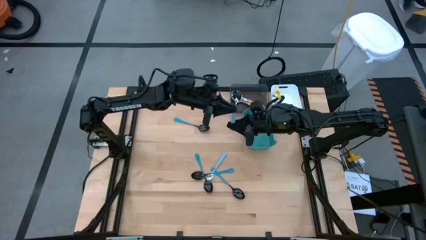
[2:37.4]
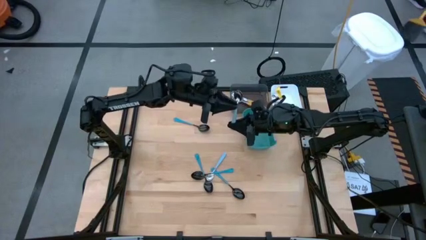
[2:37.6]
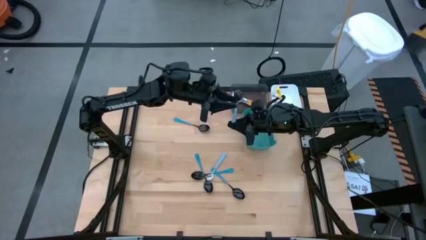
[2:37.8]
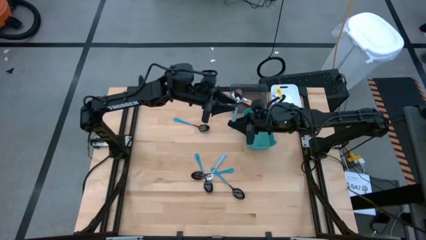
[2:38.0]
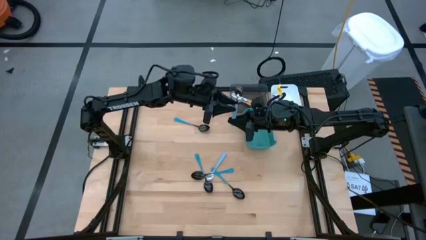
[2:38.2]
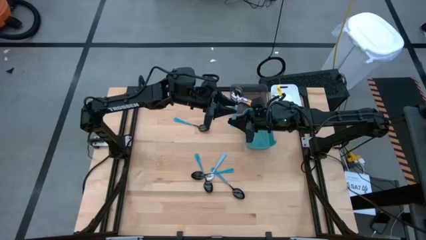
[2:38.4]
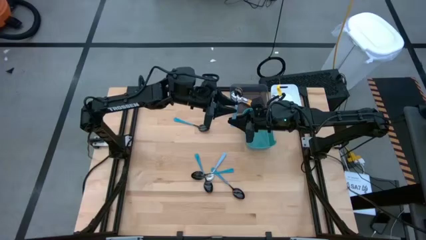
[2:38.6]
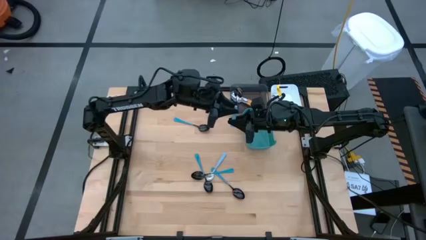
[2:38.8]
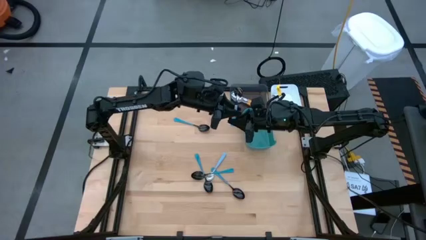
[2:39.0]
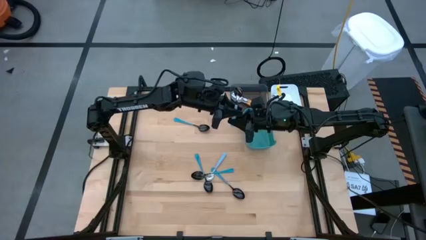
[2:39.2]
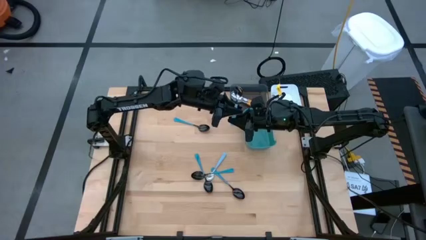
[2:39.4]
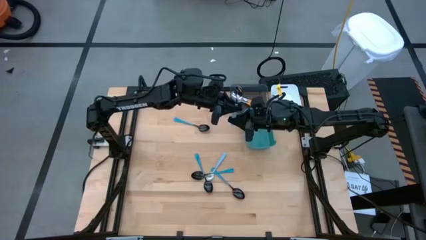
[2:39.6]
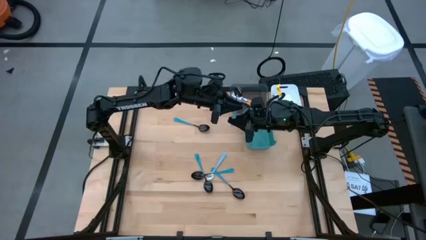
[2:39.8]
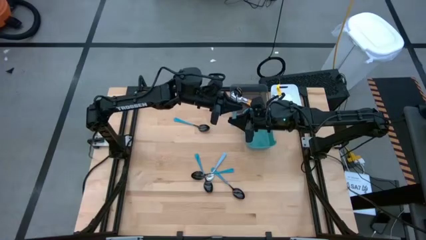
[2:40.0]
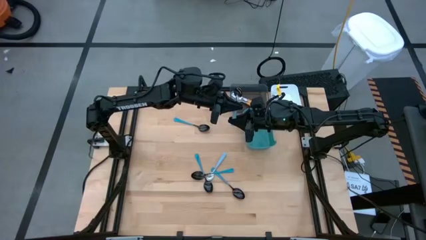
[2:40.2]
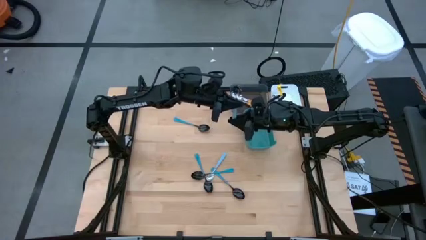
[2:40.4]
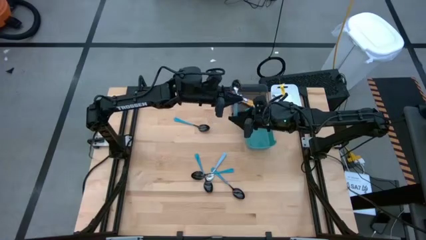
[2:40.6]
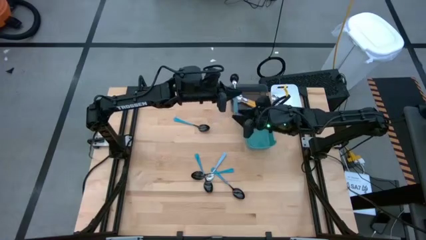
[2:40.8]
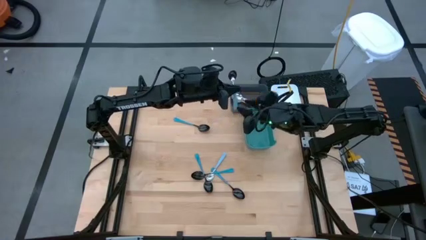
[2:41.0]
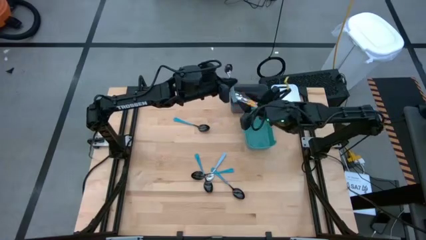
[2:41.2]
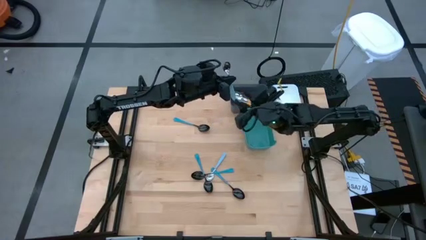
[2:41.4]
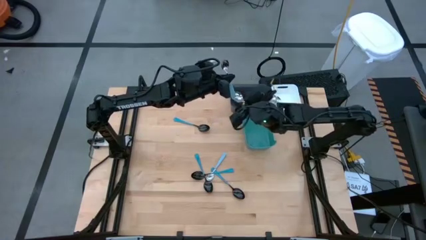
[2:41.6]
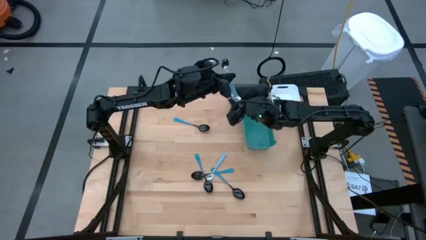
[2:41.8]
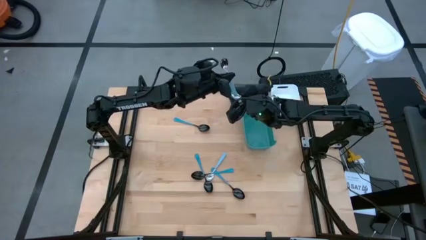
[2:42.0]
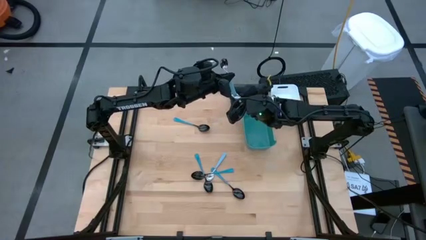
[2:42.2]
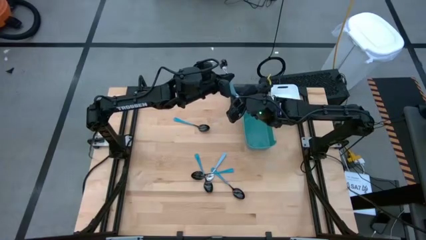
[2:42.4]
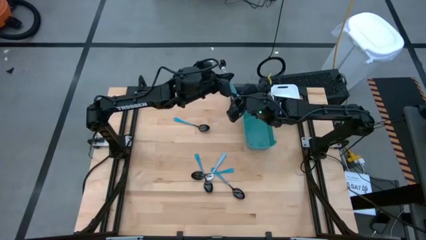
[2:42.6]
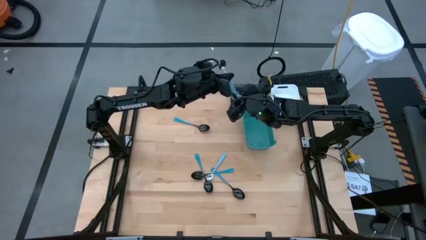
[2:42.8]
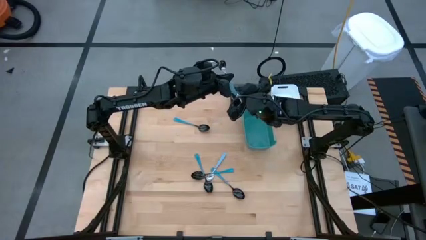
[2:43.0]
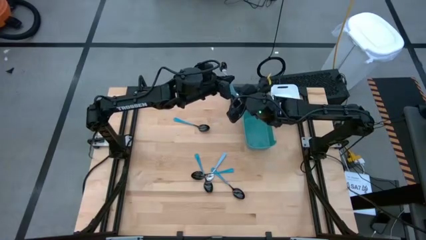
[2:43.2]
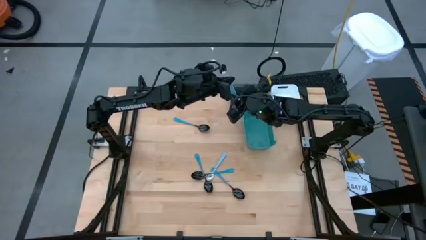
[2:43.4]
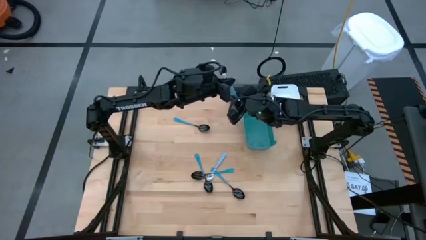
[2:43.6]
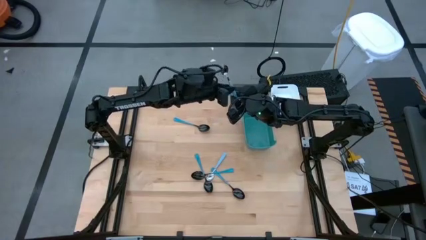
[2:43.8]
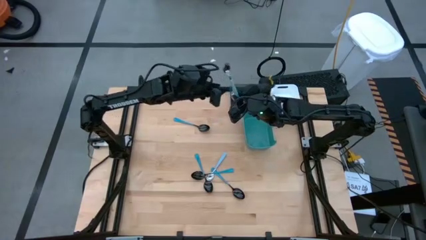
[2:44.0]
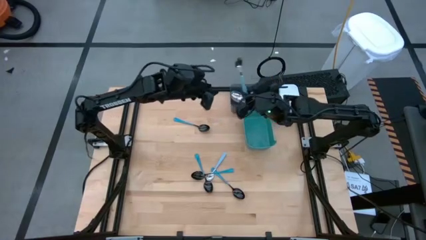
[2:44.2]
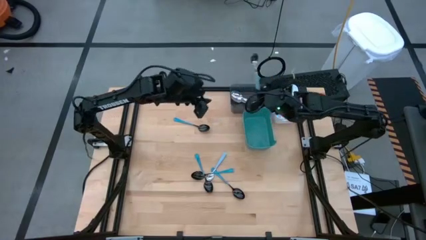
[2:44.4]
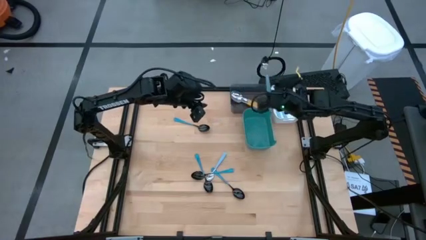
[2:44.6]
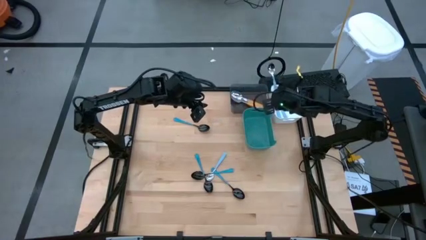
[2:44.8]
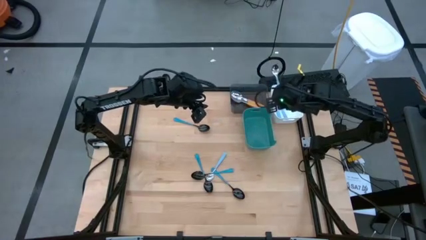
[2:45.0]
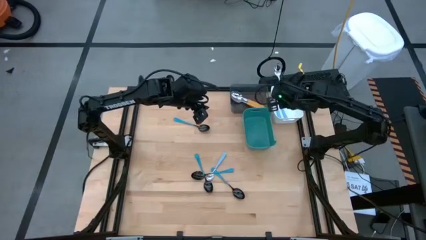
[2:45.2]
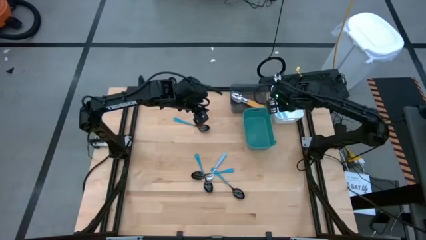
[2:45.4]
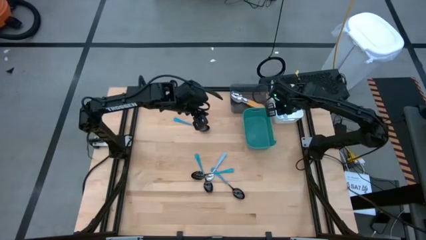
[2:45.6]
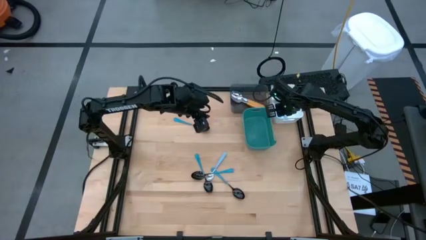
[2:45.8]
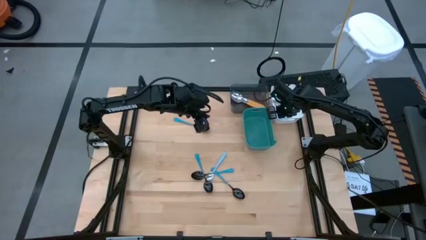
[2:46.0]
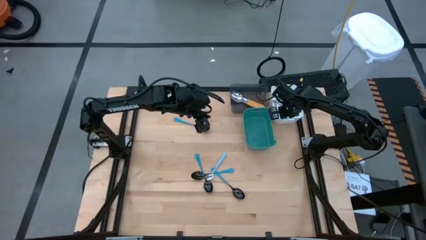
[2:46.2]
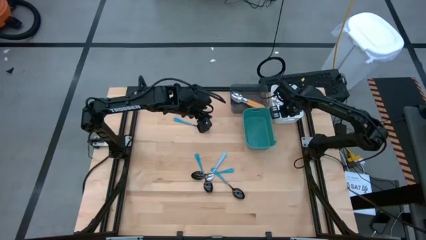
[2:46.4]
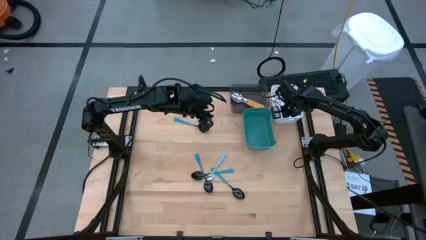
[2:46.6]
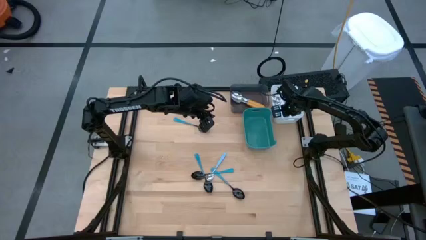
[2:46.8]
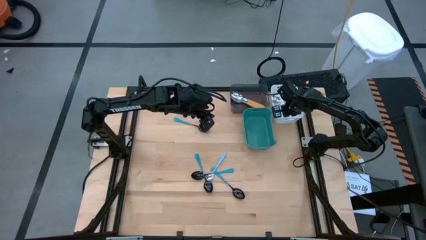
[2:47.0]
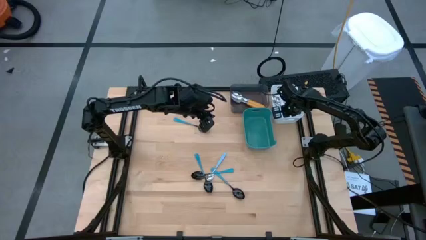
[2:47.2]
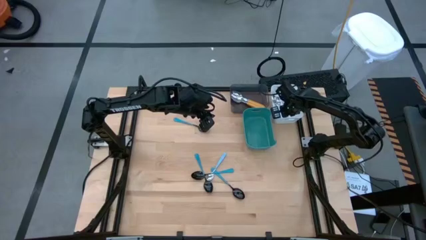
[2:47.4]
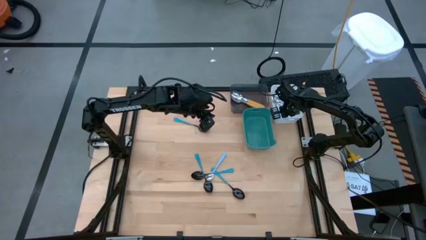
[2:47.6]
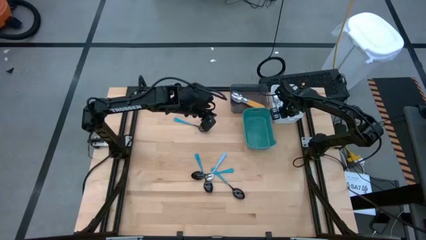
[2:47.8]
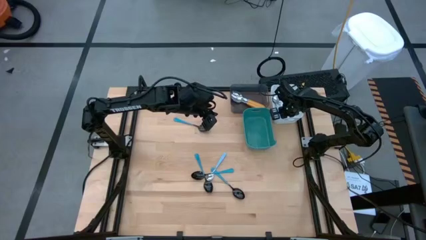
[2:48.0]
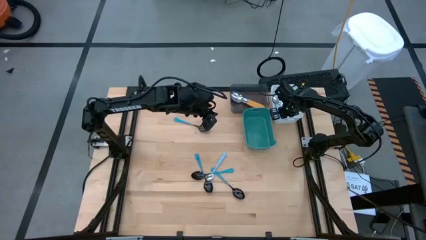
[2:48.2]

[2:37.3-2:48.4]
Task: Sort silverware by color (type)
Put the light blue spoon into the white bin

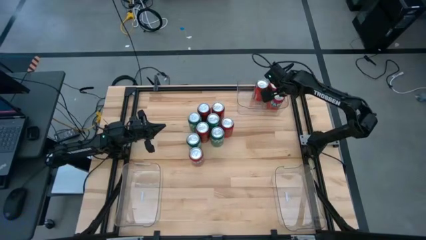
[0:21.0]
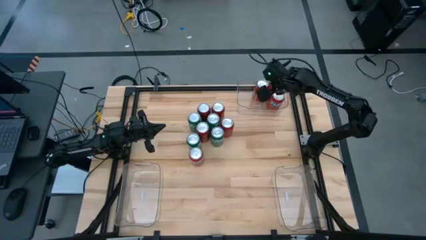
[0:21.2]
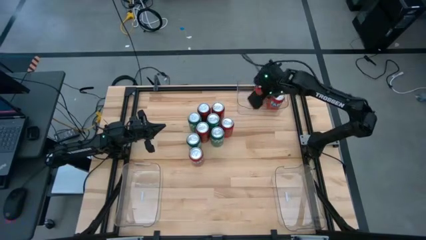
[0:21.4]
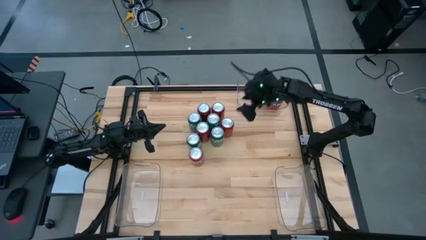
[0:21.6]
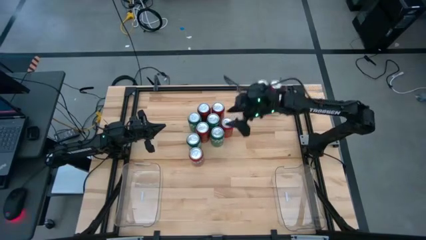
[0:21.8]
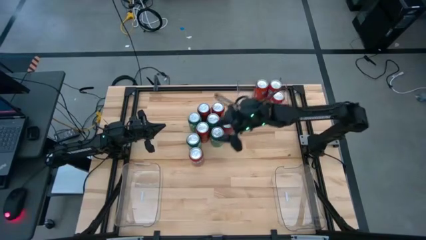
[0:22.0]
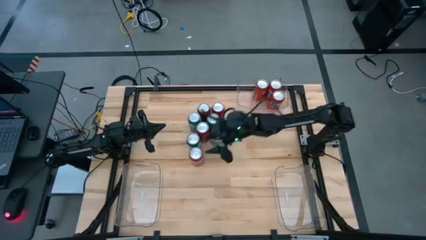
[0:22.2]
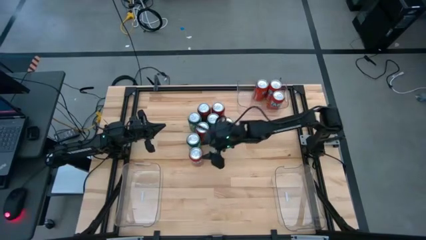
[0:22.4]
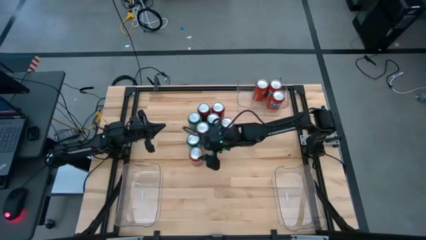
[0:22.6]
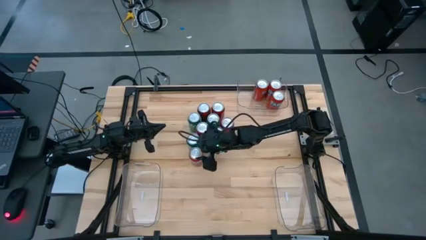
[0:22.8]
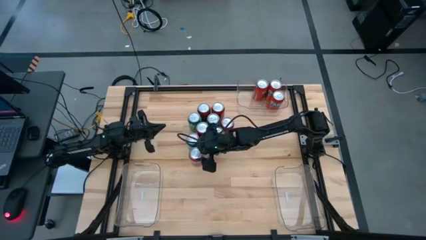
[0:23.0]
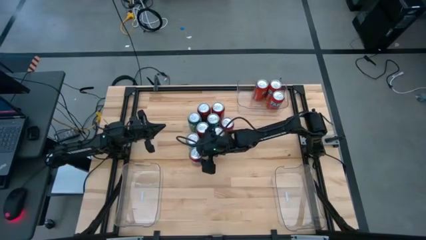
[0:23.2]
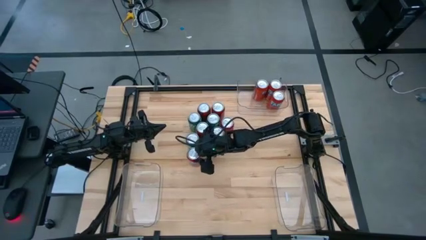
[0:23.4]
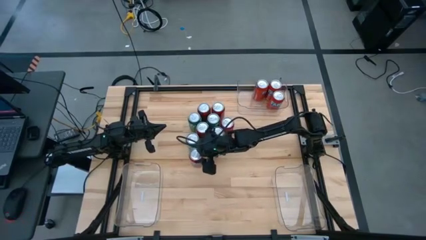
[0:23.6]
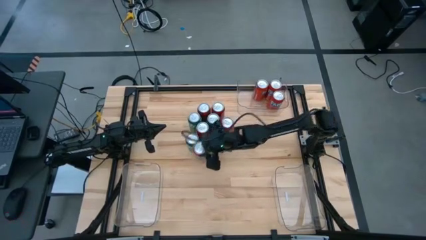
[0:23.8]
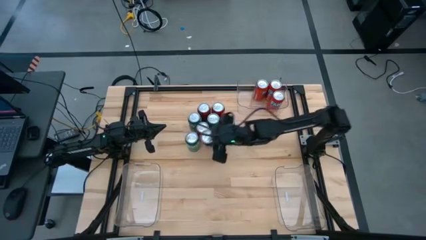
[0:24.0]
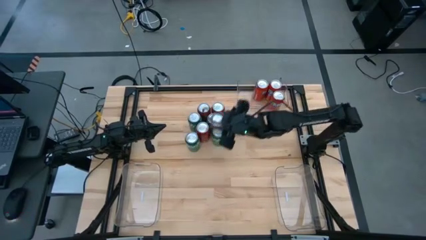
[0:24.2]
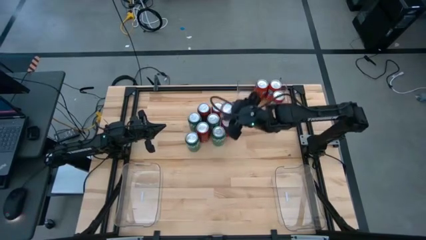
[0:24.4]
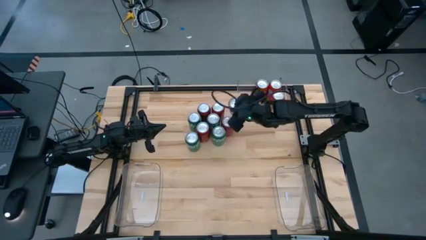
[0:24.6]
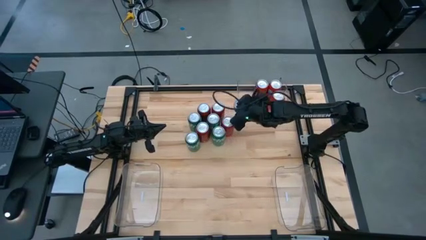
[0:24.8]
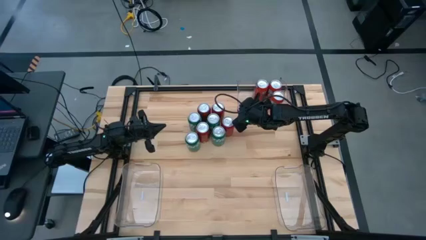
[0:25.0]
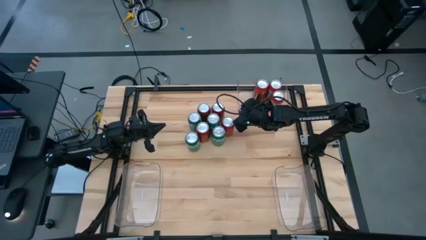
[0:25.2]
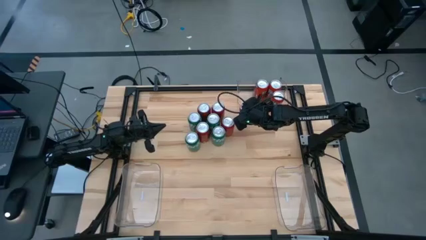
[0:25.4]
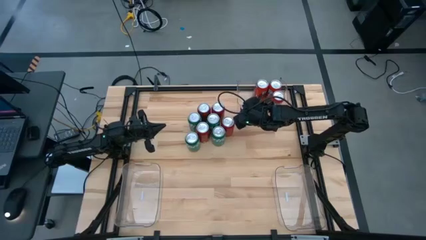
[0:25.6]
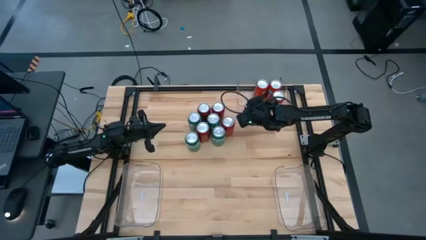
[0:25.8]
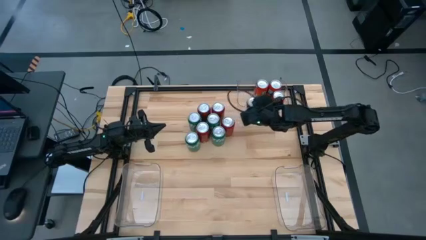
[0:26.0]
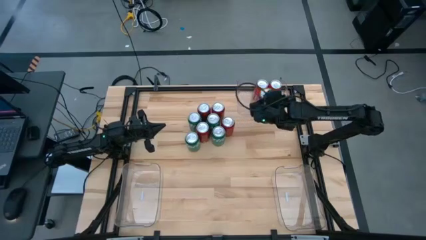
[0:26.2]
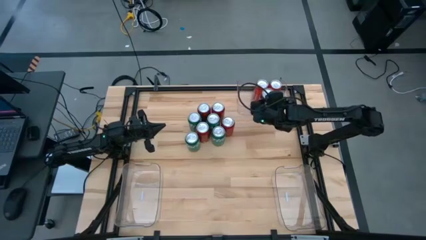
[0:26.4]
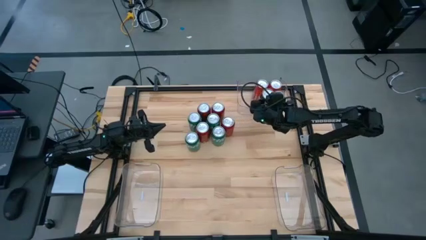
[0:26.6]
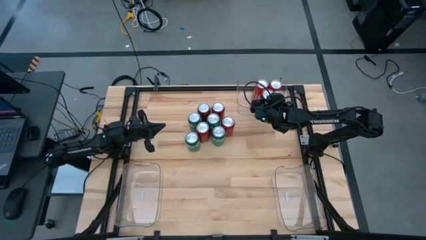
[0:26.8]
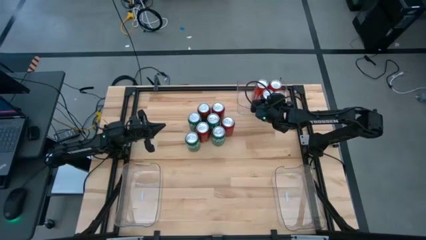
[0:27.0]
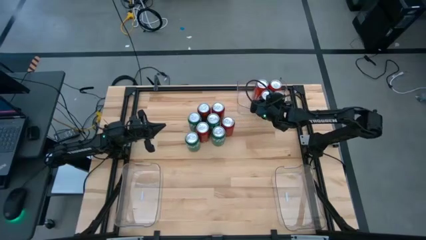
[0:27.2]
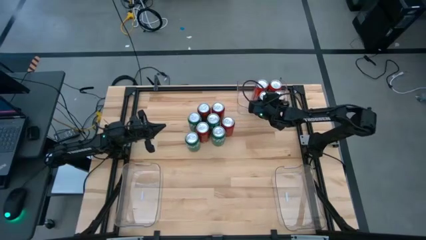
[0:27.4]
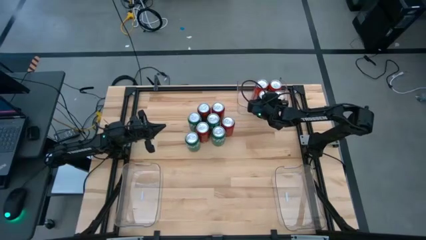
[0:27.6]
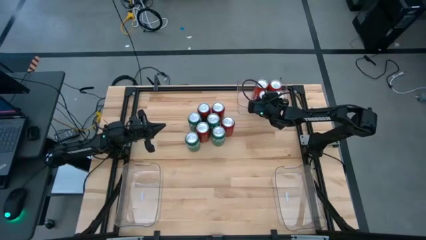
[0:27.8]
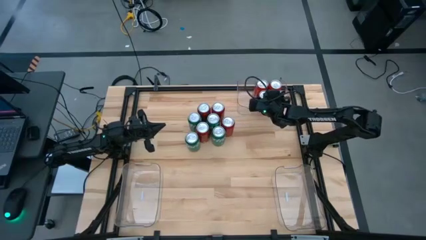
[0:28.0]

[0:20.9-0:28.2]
Task: Sort soda cans
Put the orange soda can into the top transparent bin
